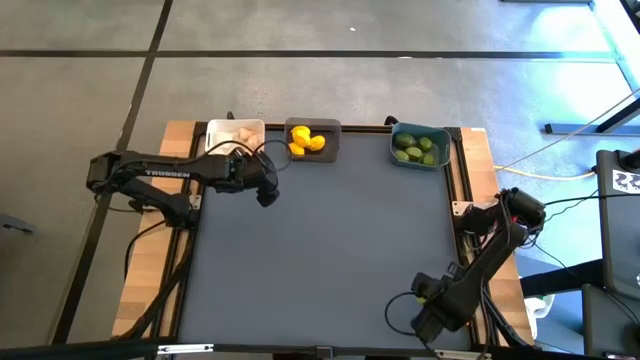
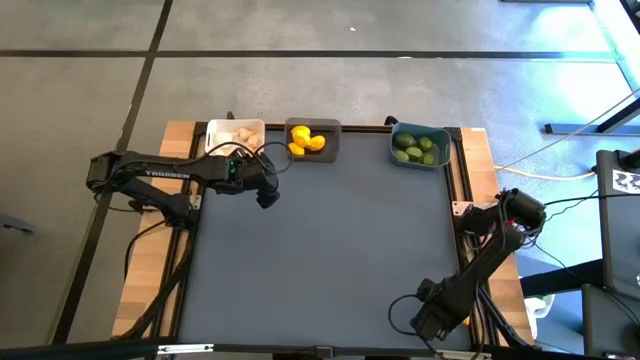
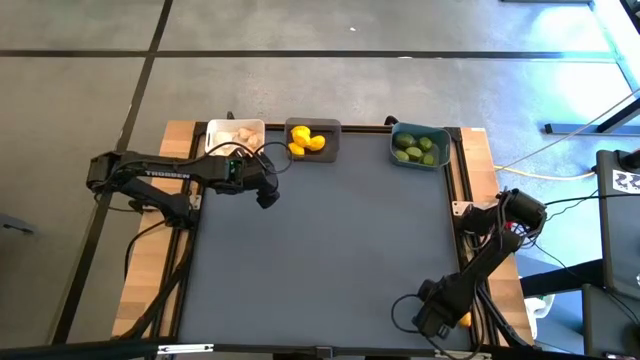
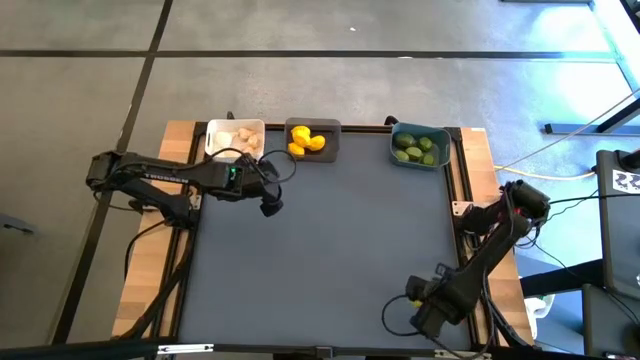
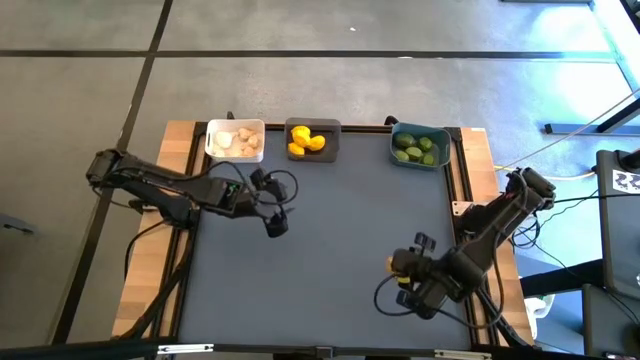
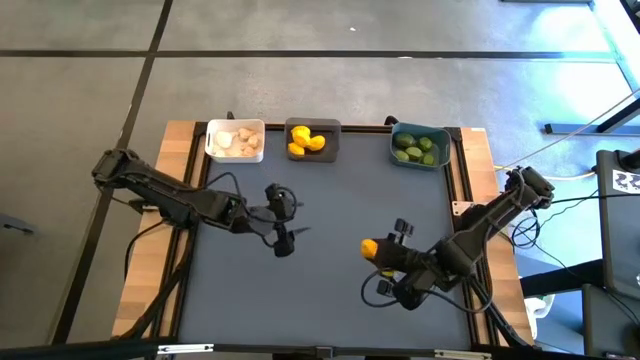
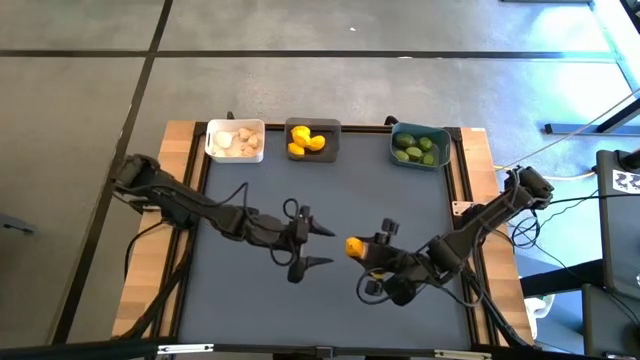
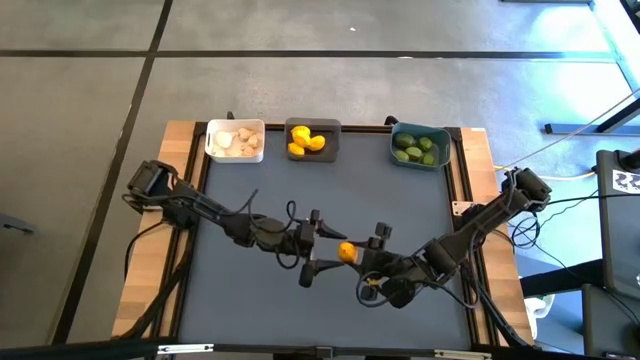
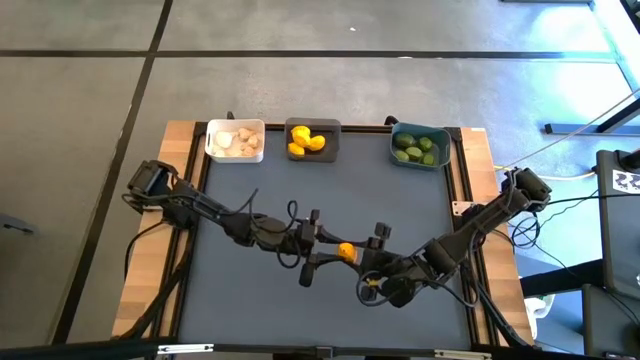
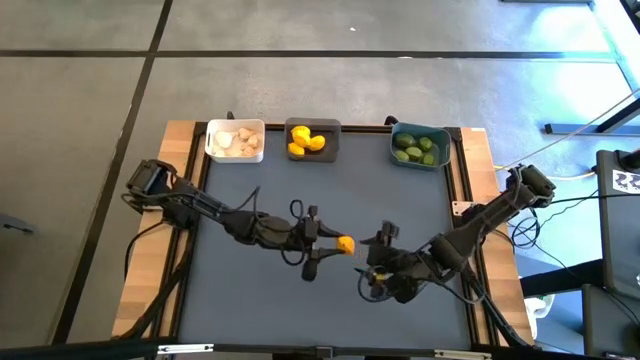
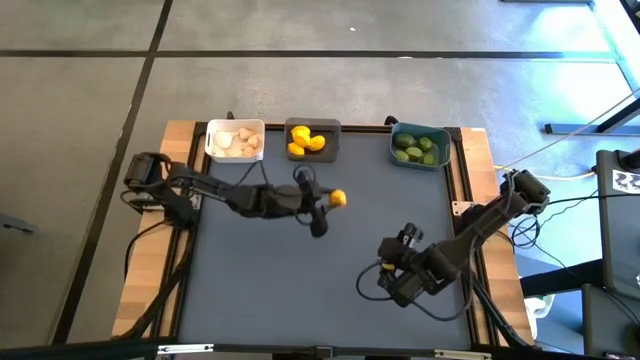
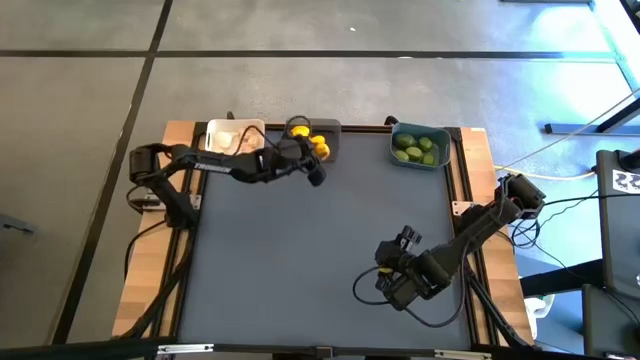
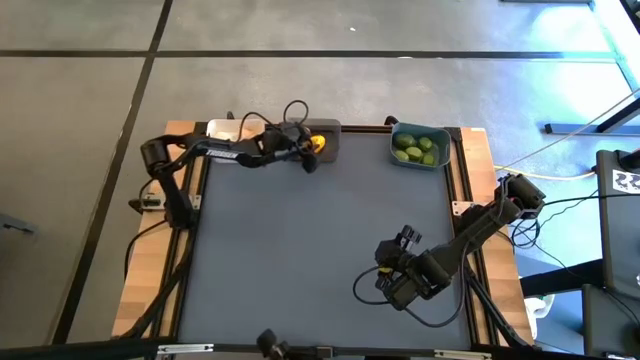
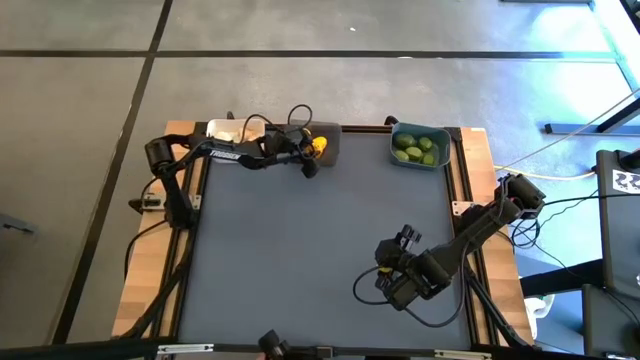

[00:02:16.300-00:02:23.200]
Task: Sort produce into baskets
Put the lemon into the black transparent bin

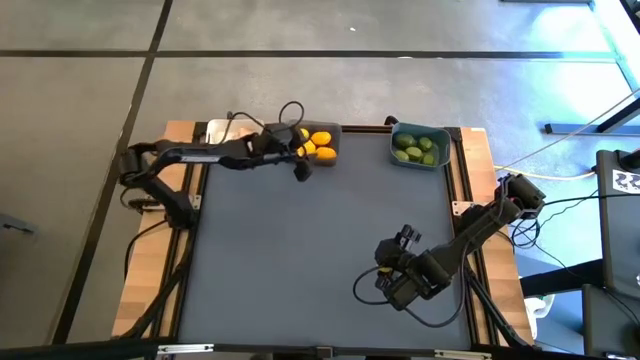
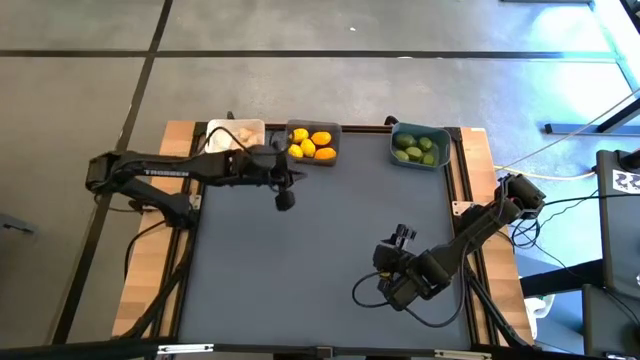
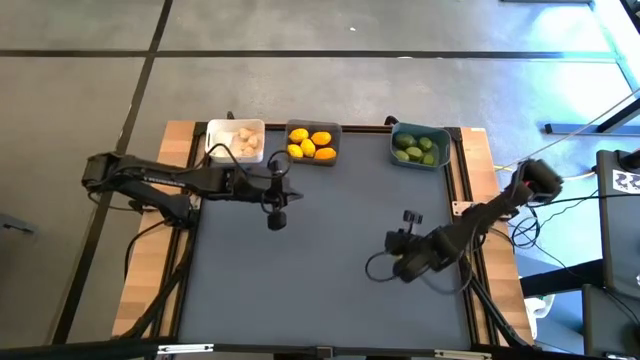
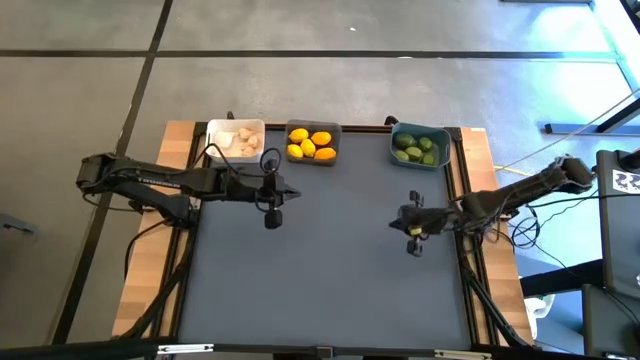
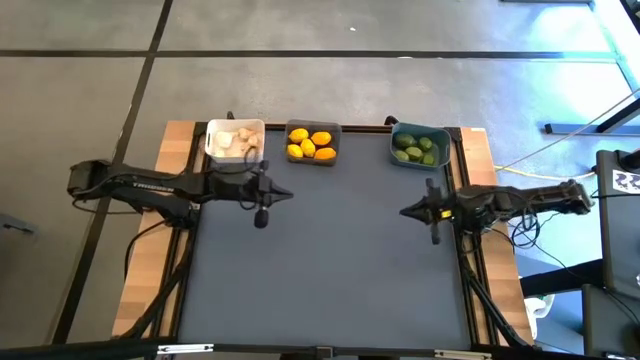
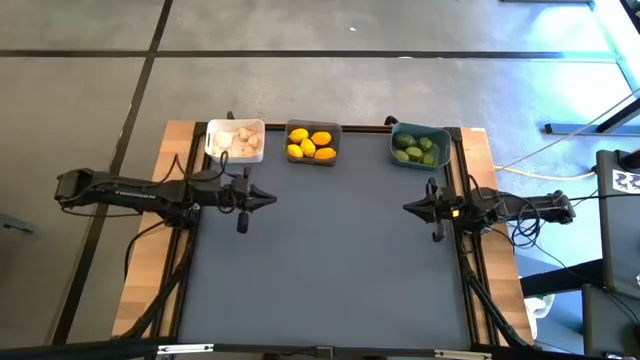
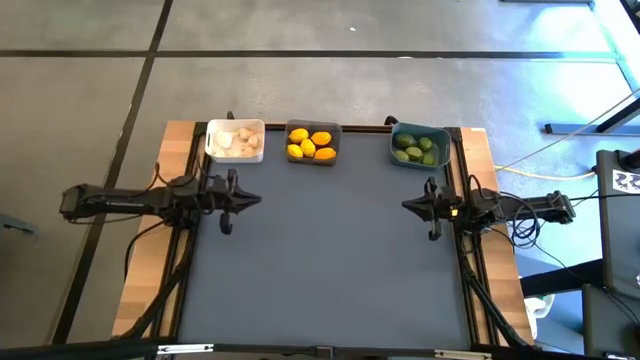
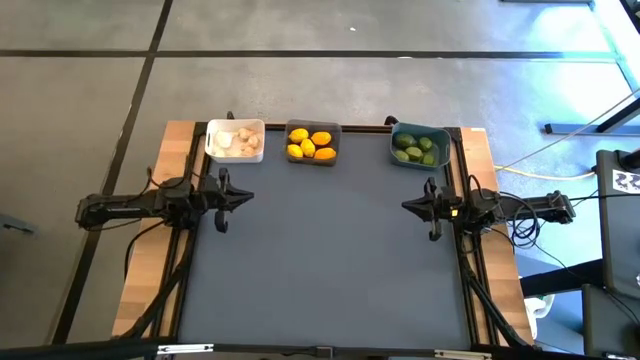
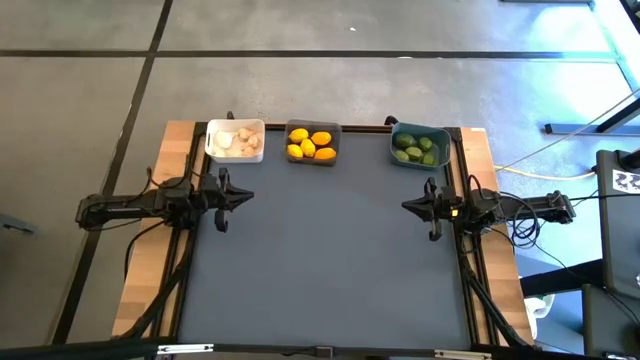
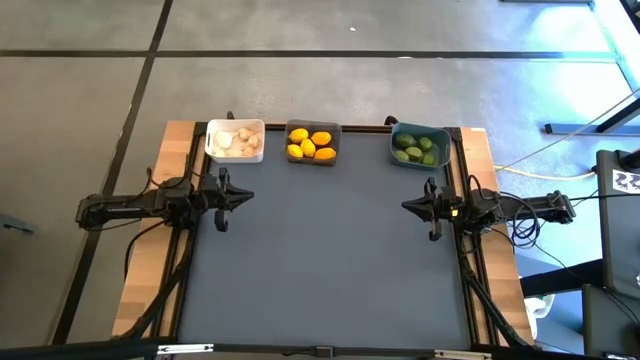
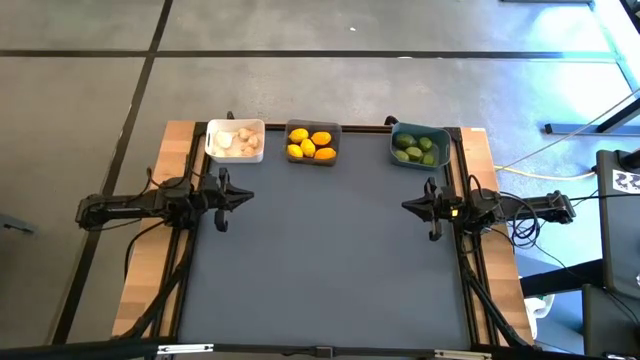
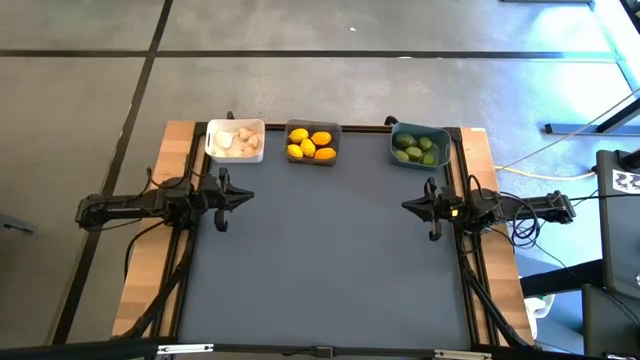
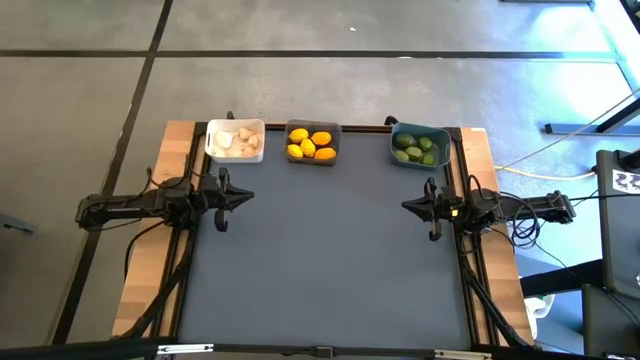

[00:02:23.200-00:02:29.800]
Return to Home Position

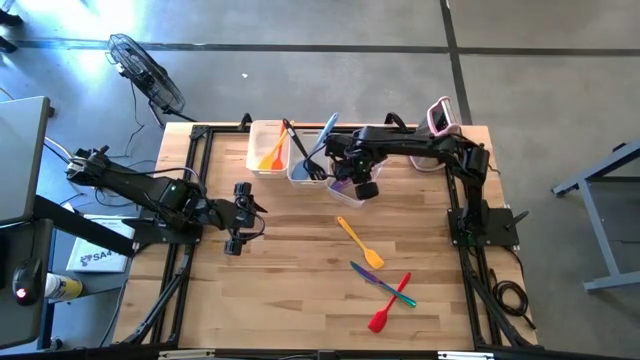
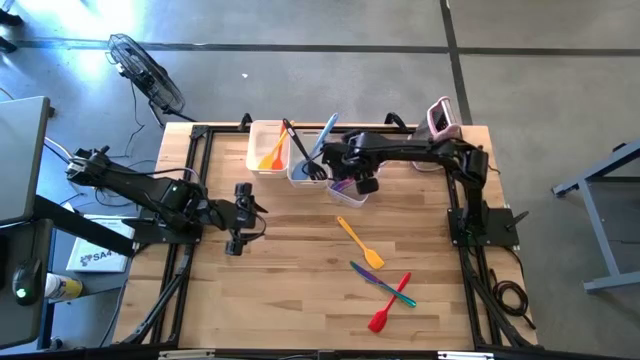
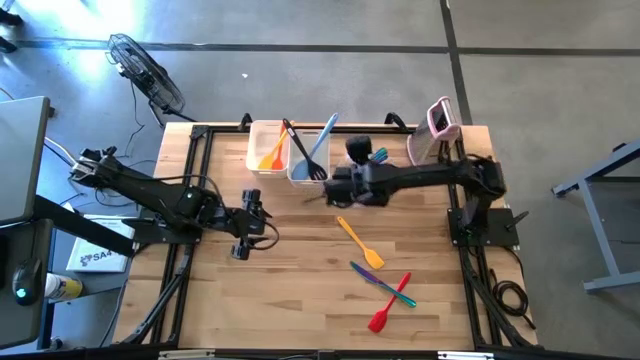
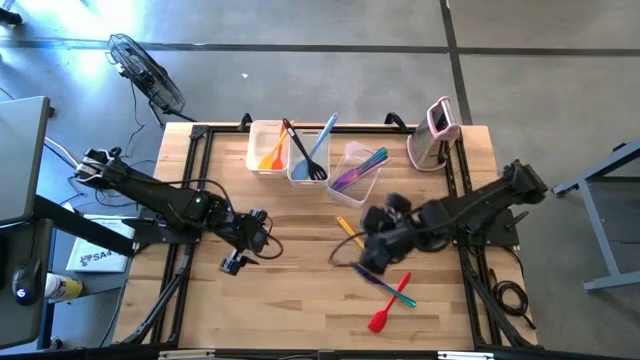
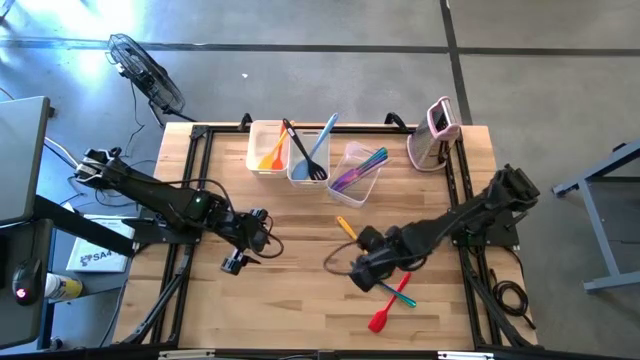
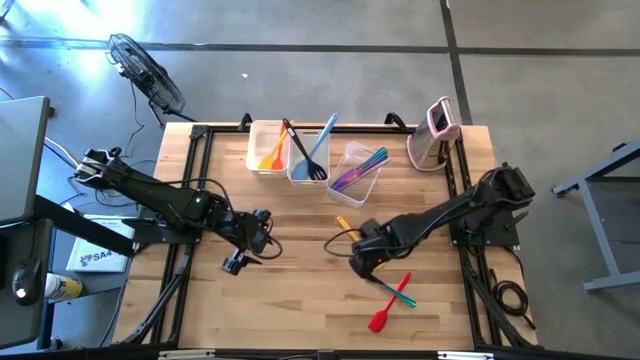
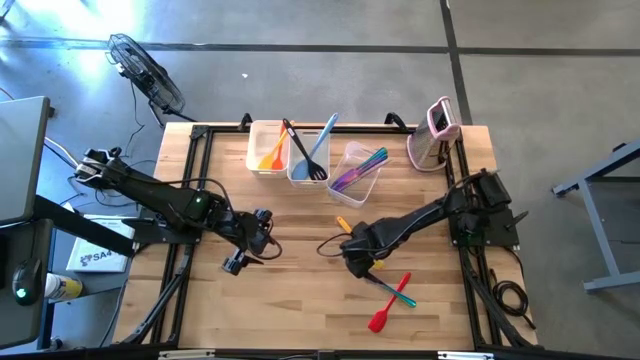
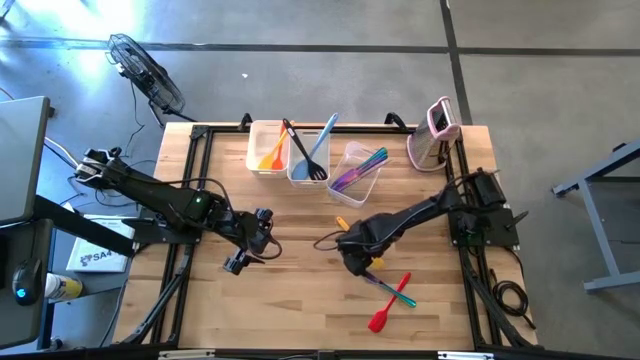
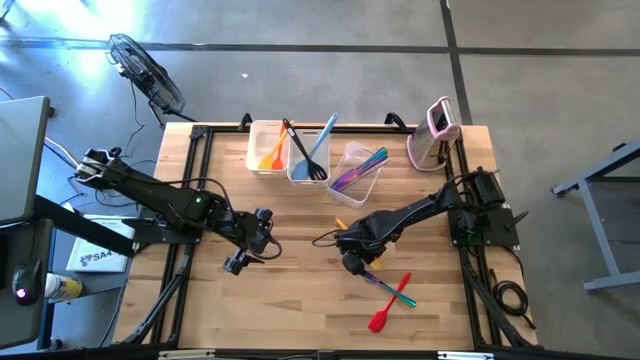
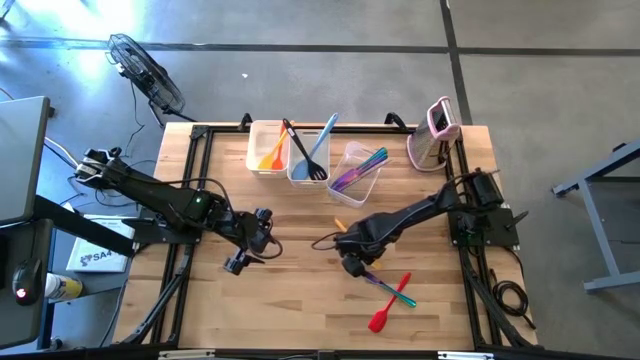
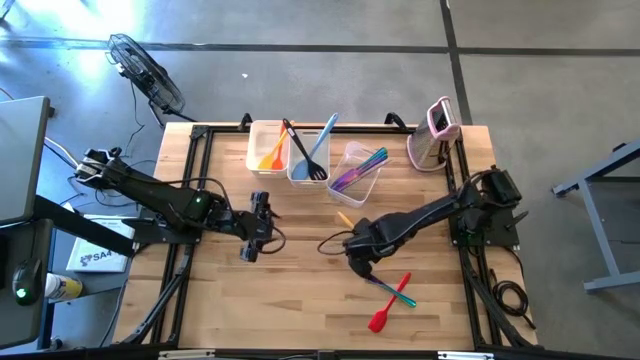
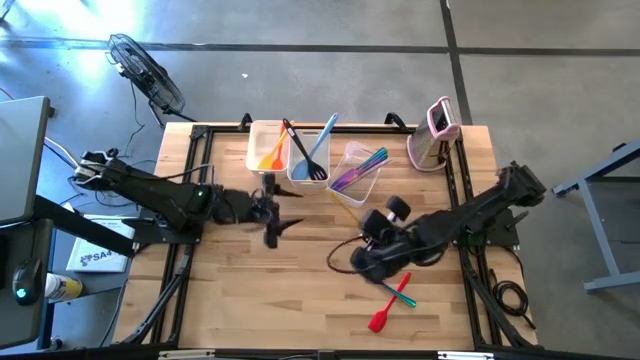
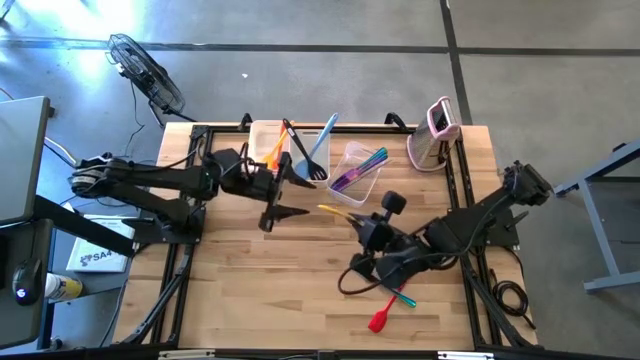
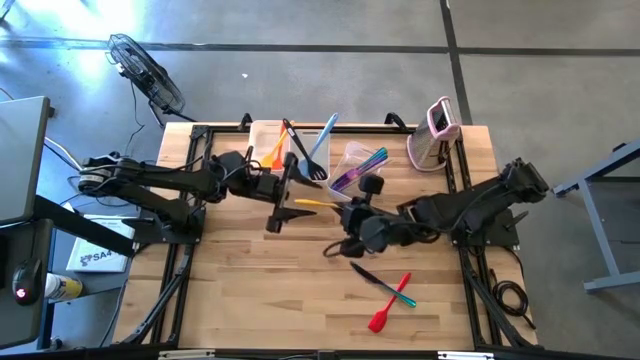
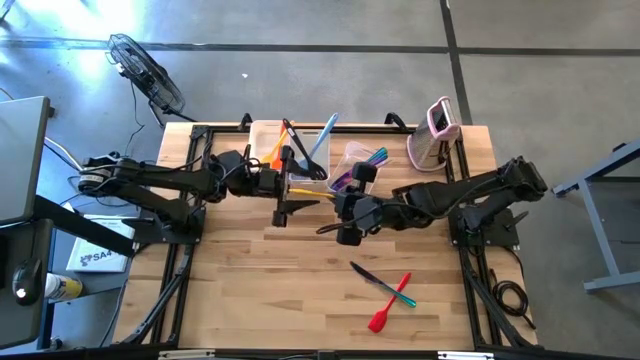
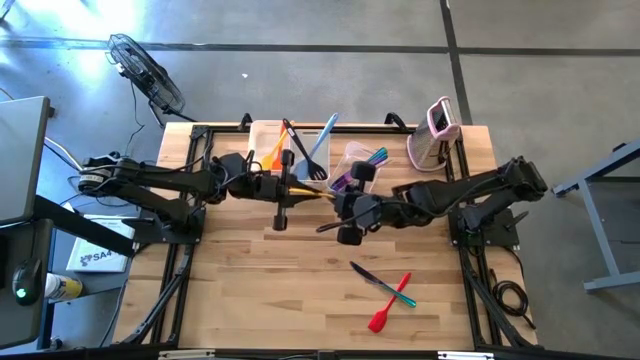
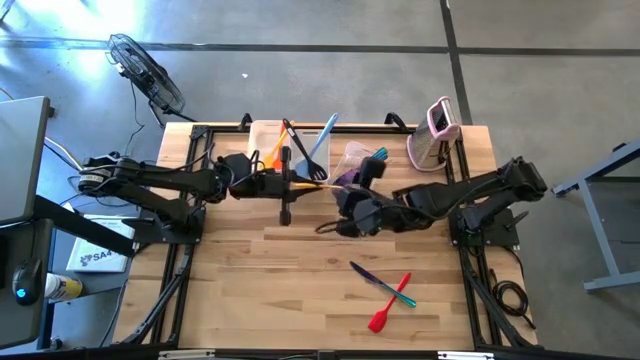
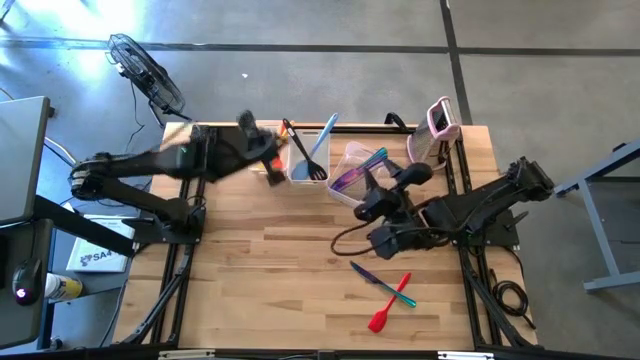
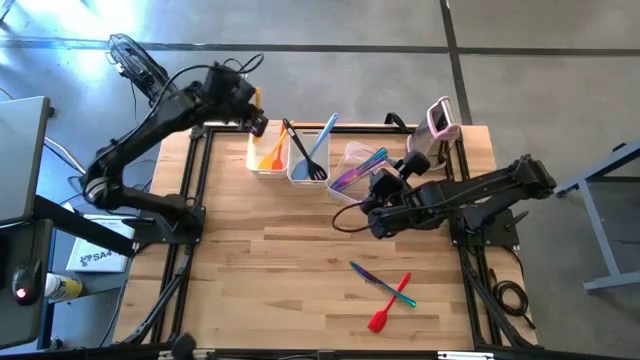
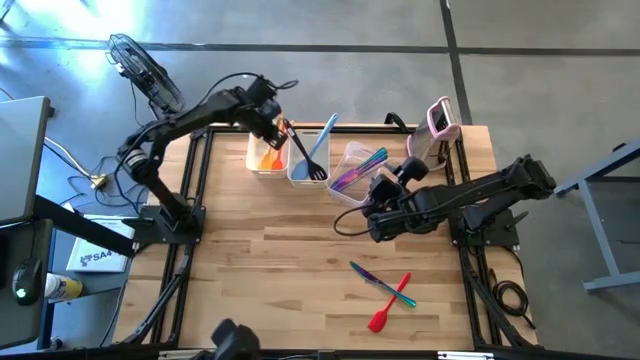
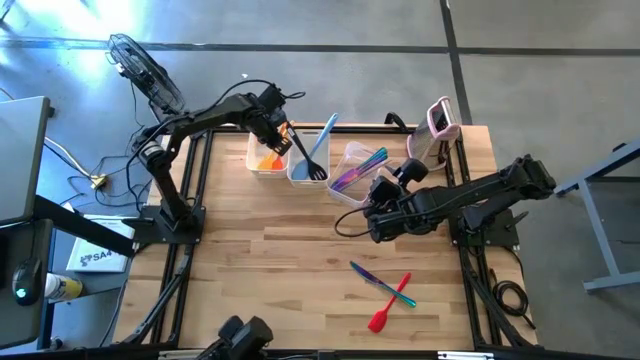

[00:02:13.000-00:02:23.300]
Task: Pick & Place Kitchen Items
Put the yellow spatula into the left white bin
